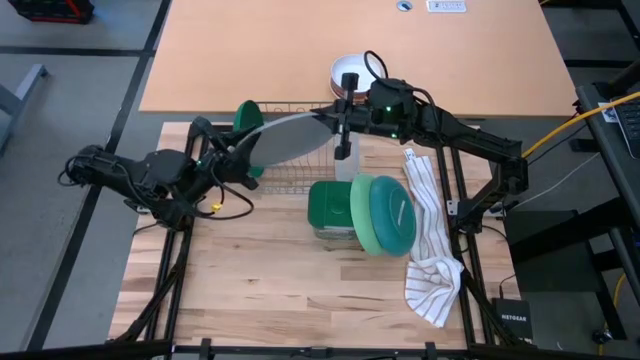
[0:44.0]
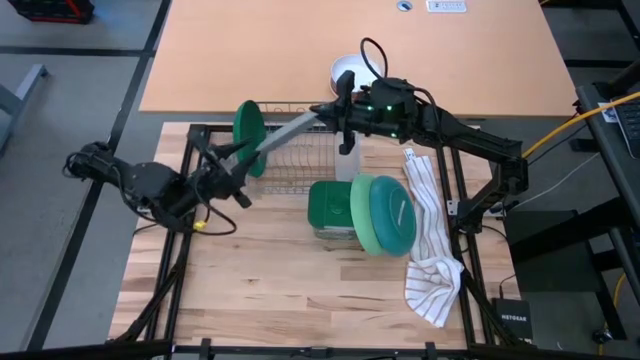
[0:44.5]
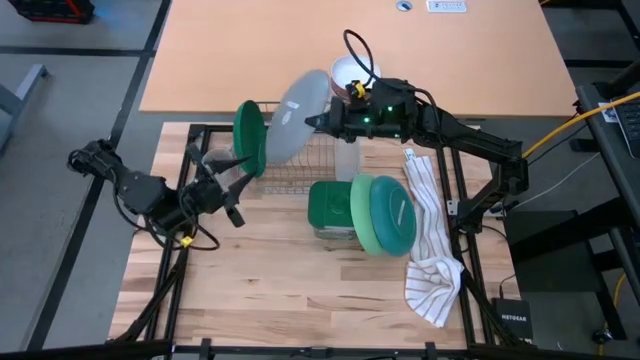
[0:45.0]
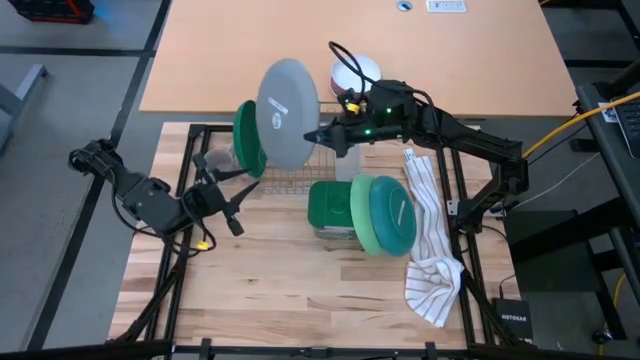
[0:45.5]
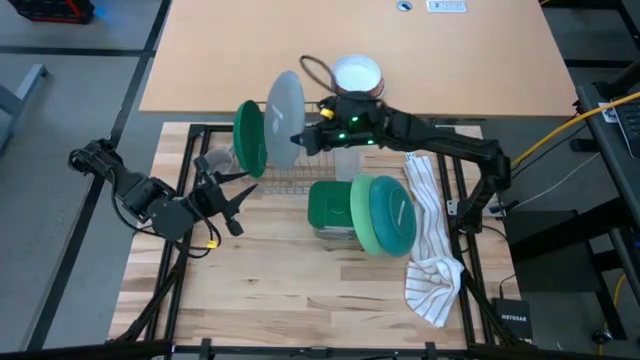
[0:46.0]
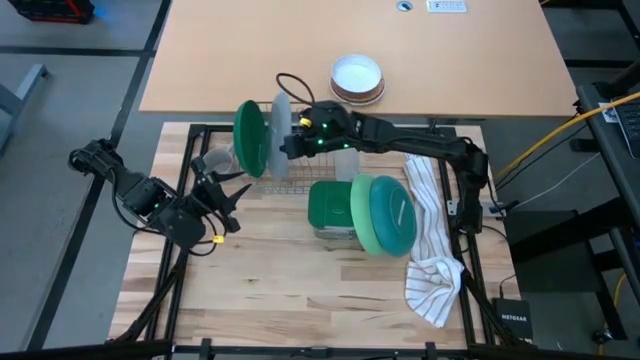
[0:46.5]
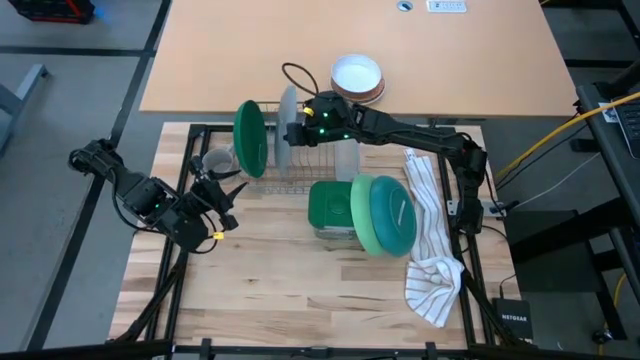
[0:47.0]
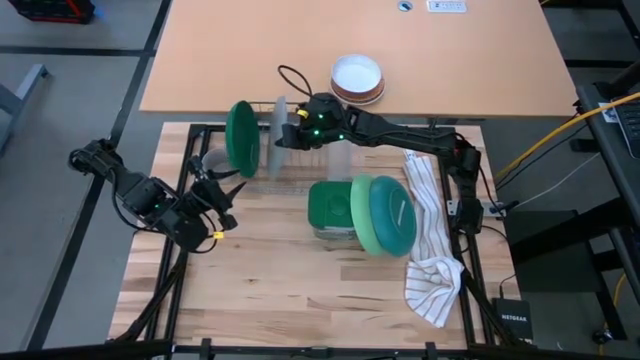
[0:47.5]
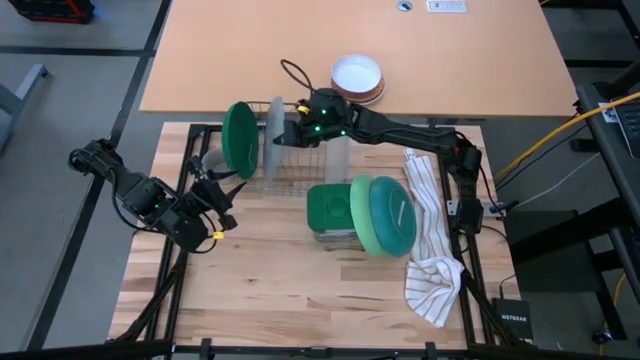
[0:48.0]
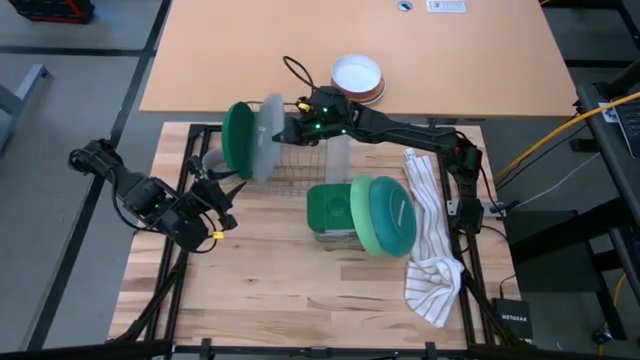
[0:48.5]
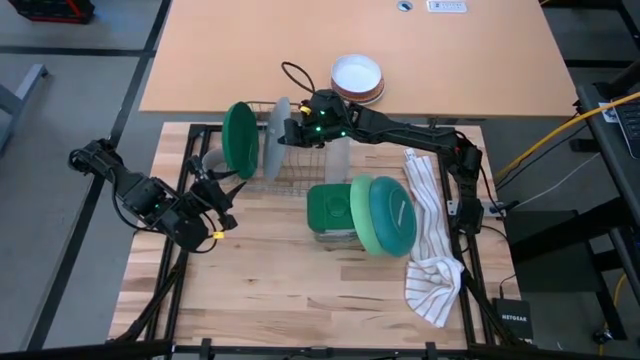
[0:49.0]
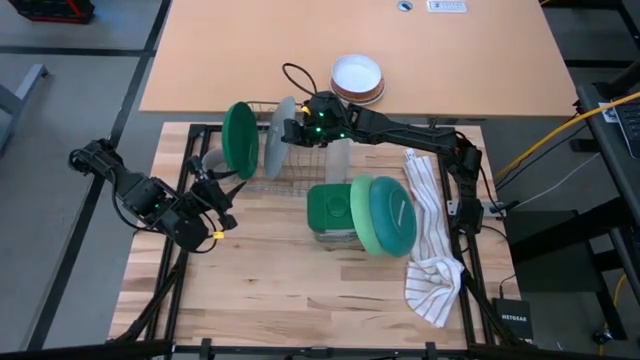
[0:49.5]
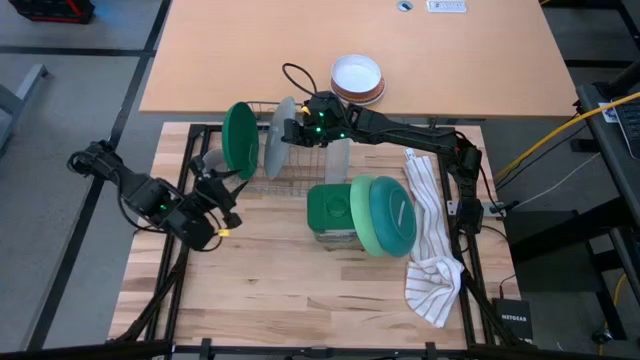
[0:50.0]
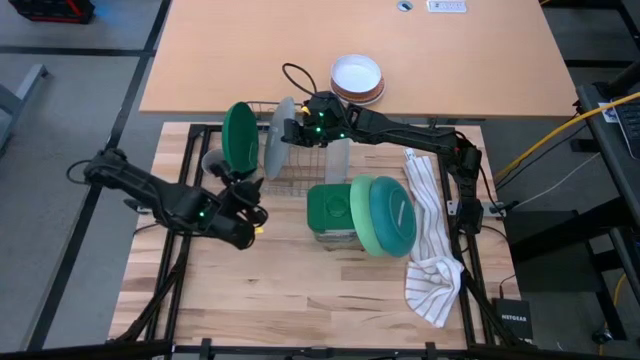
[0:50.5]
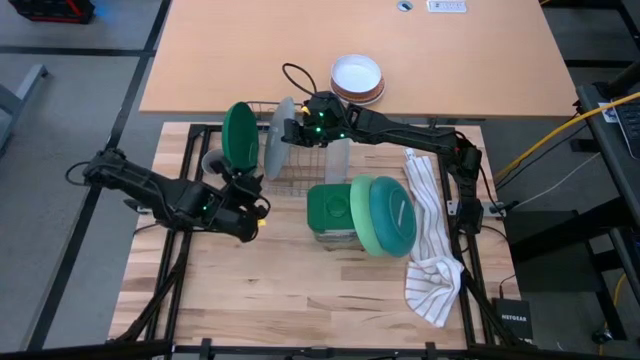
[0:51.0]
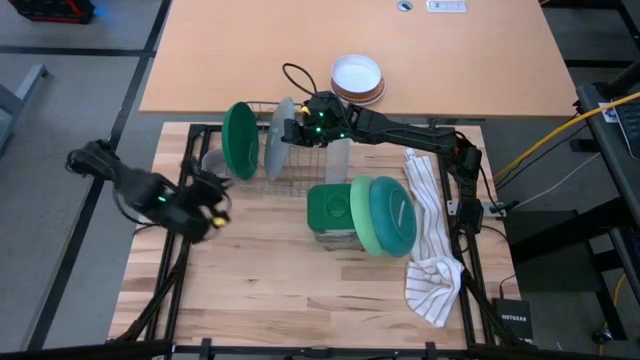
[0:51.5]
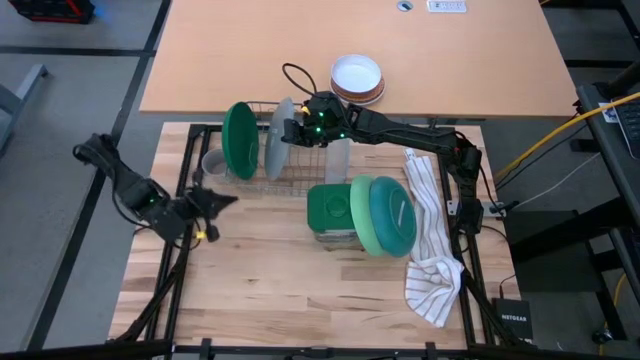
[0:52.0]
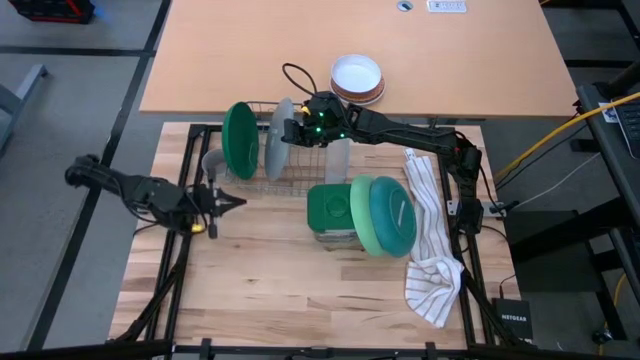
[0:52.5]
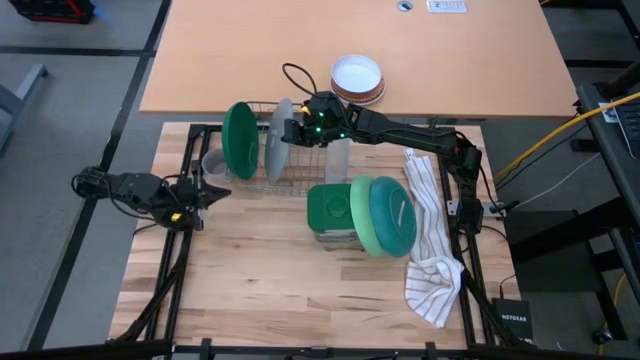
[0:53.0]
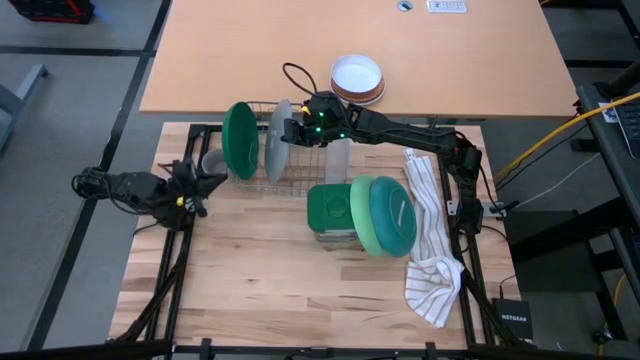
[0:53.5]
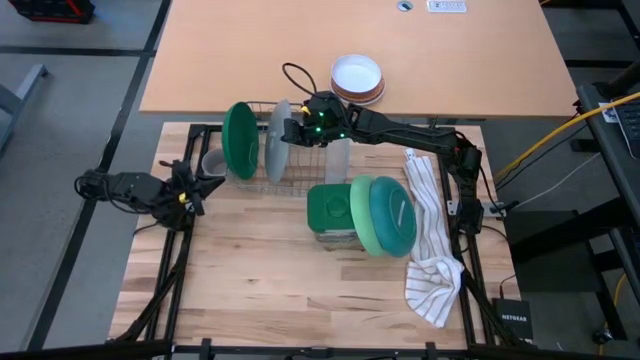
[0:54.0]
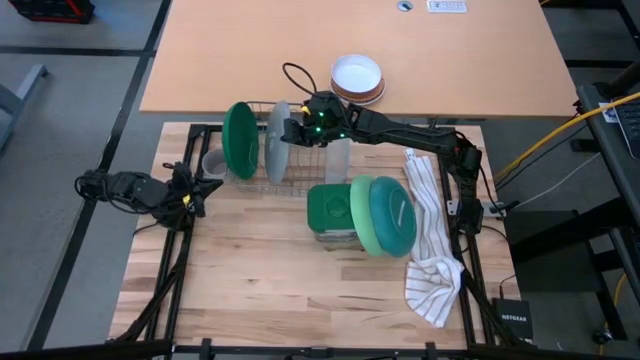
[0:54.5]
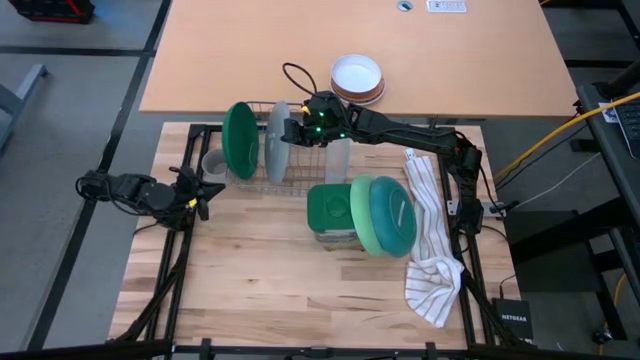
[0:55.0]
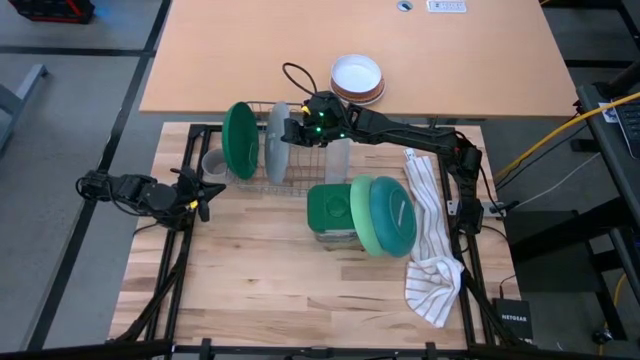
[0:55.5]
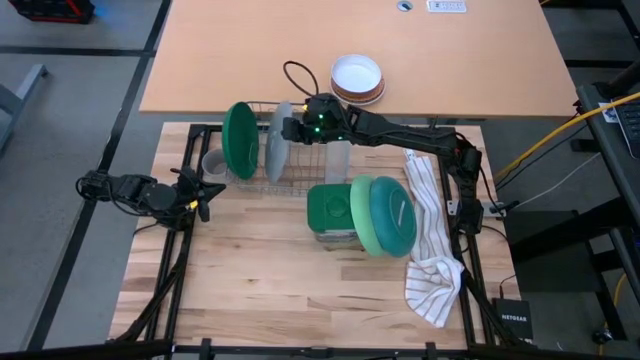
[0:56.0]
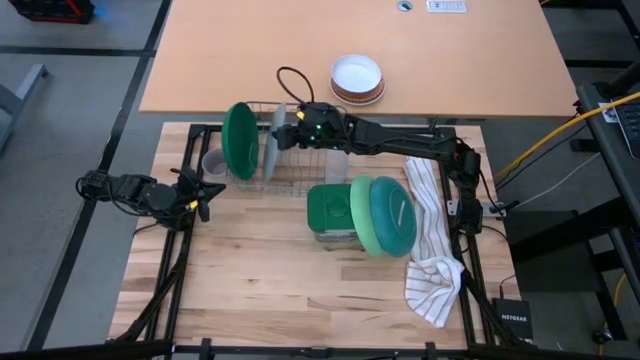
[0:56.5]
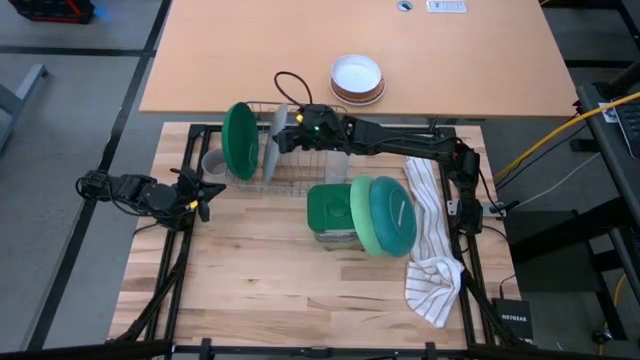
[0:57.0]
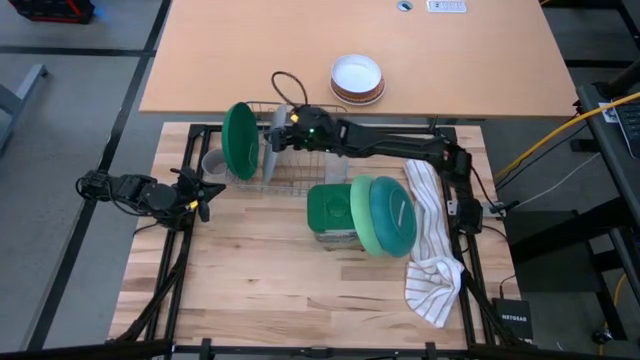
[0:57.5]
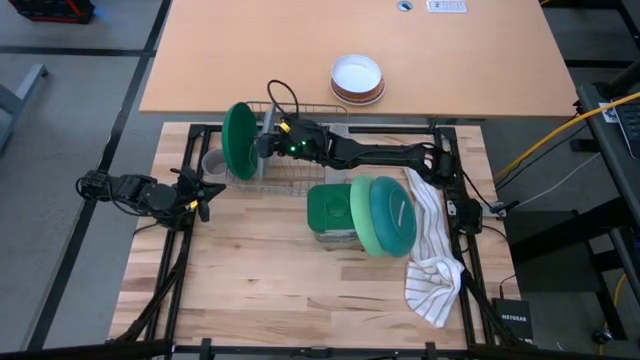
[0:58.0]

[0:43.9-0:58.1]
Task: Sort dishes
Put the gray plate into the dish rack

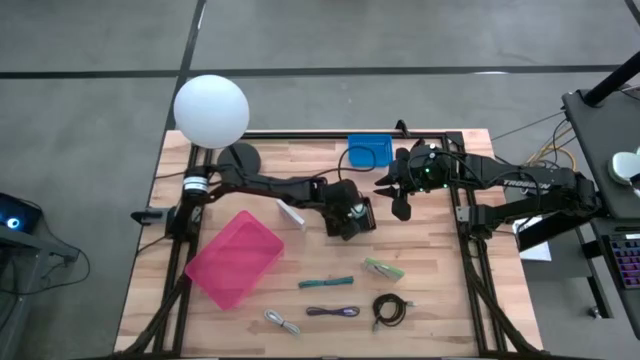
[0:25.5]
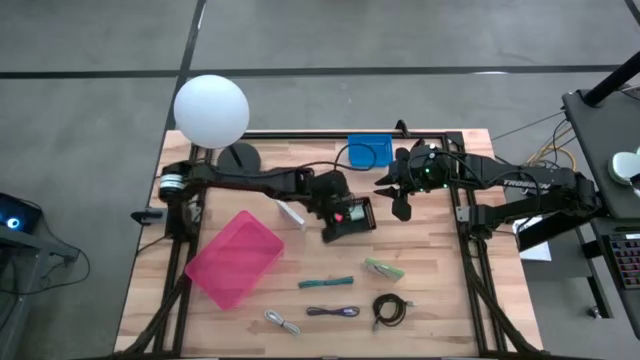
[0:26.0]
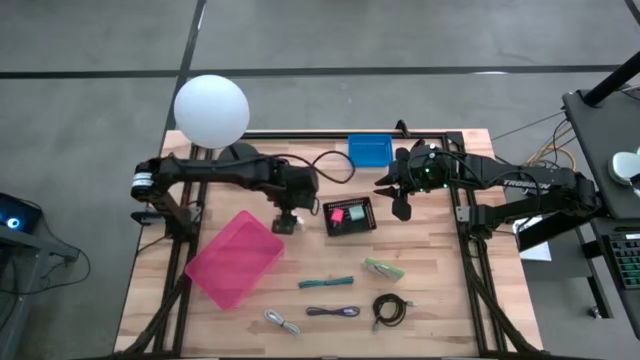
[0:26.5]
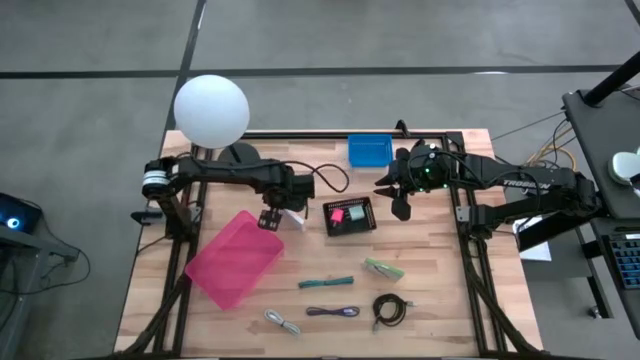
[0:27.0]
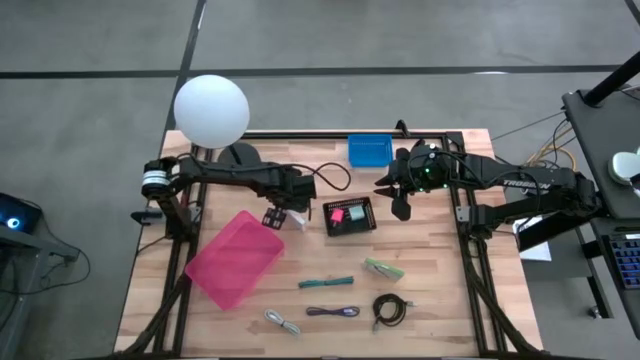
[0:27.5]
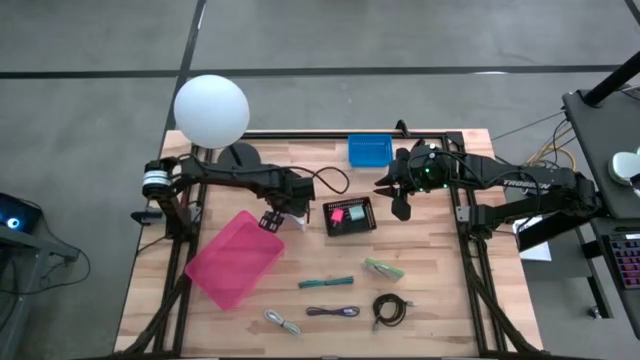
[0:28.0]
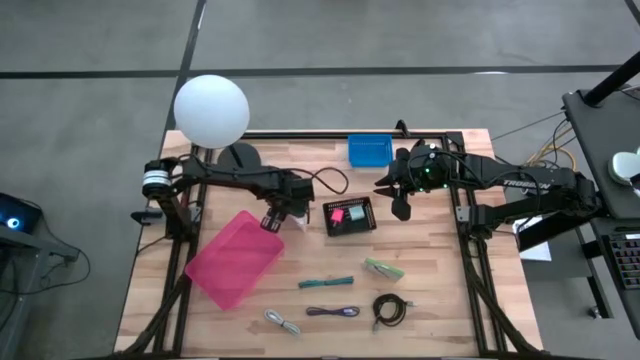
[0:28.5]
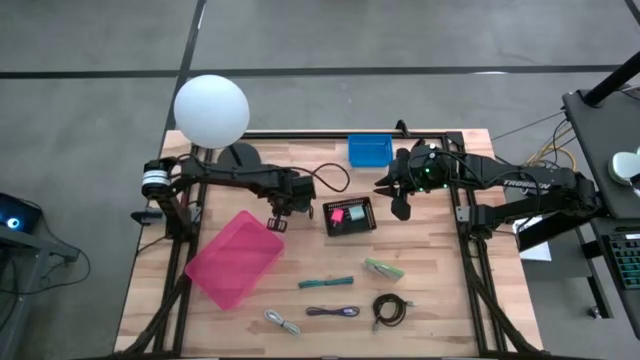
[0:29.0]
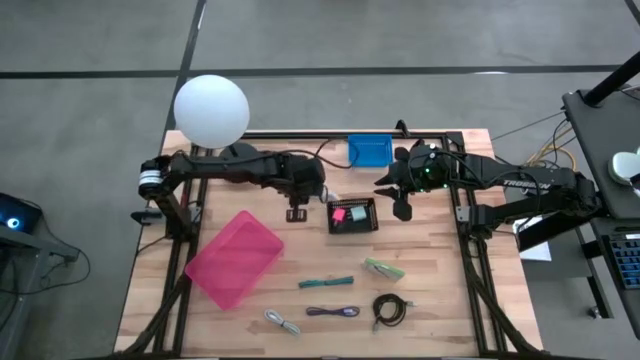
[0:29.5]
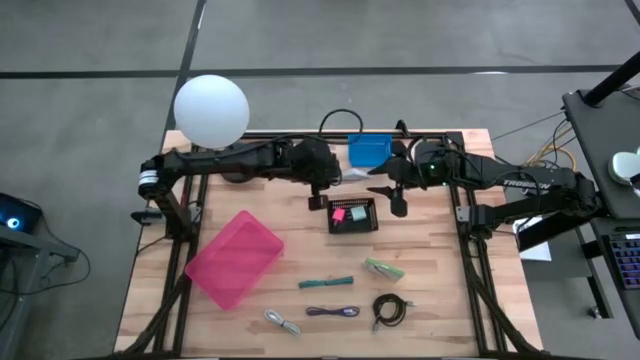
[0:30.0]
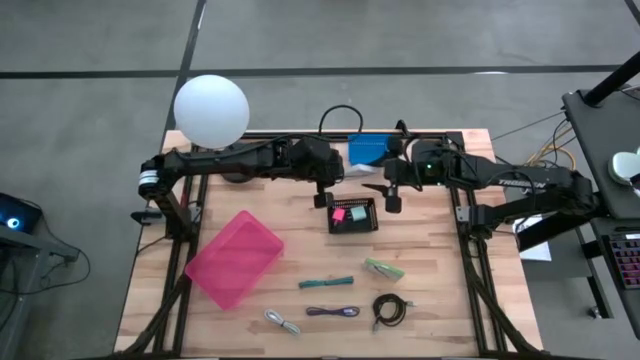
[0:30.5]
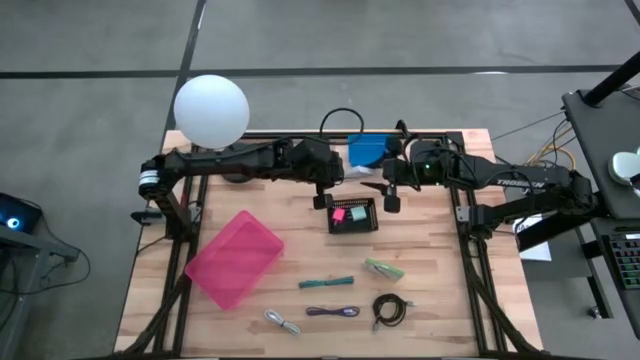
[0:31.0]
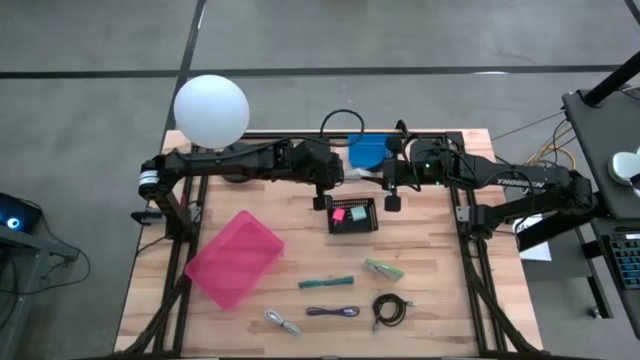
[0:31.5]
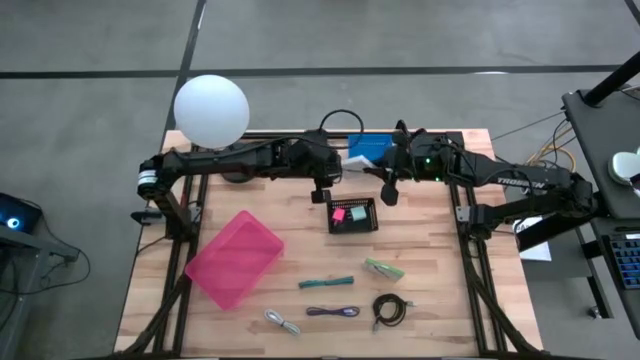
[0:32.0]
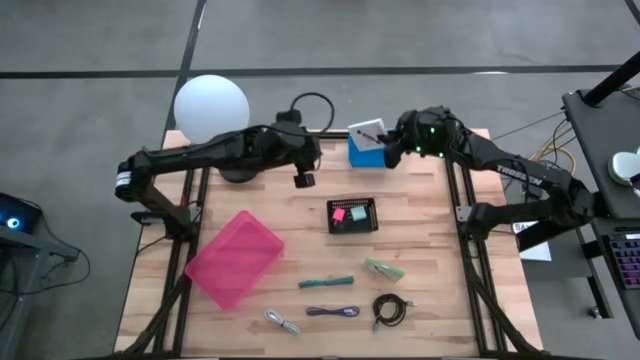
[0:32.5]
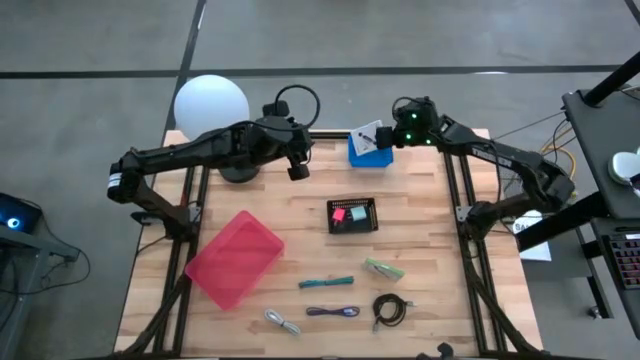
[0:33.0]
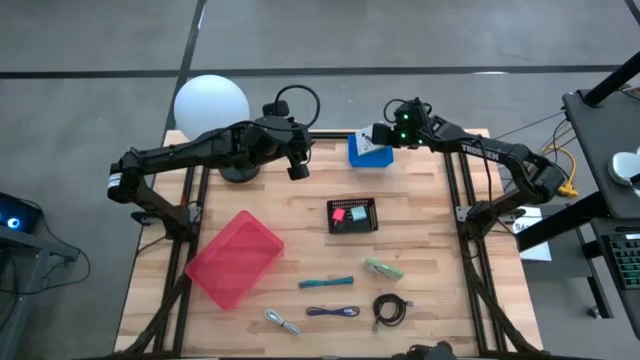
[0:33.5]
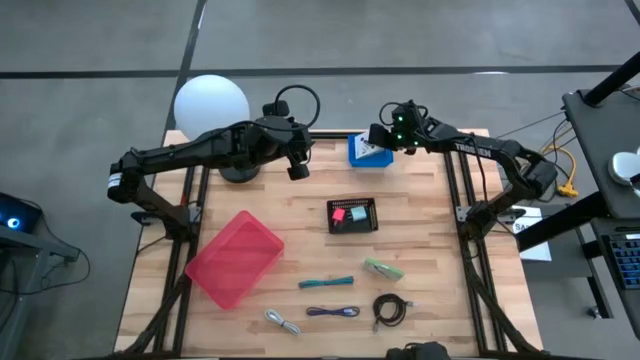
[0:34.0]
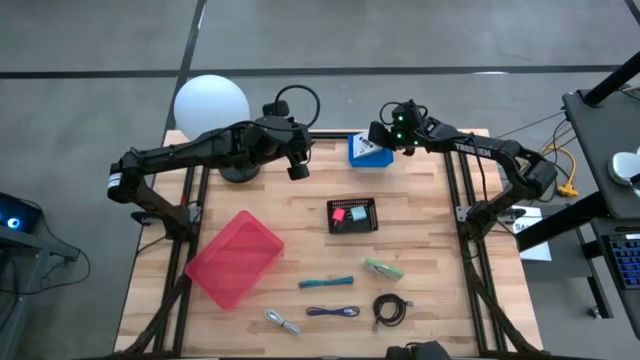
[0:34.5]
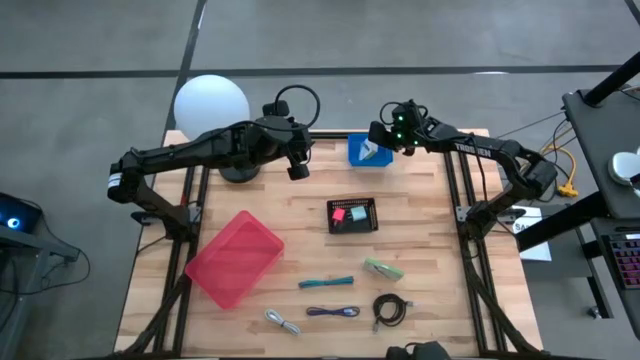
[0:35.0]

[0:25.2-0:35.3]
Task: Pick and place items into bin
Put the left white box into the blue bin
